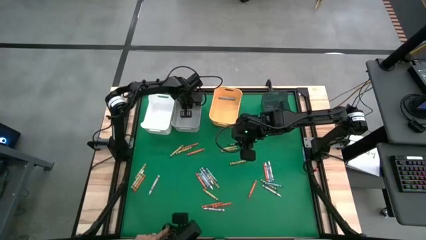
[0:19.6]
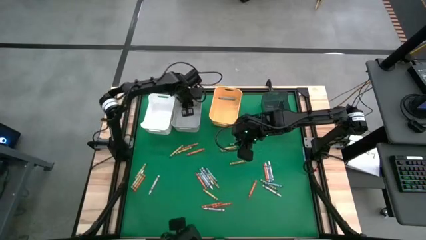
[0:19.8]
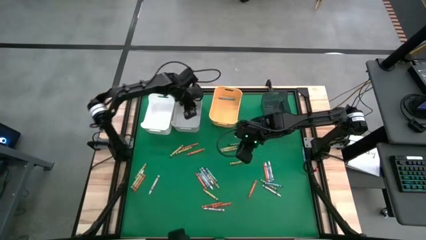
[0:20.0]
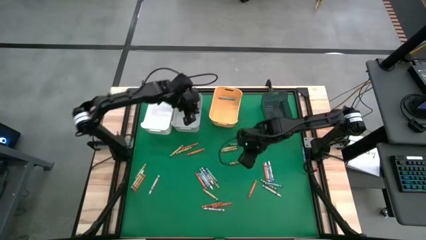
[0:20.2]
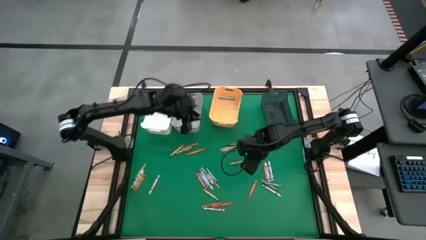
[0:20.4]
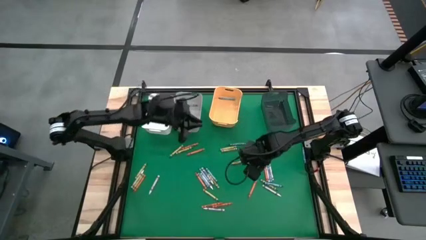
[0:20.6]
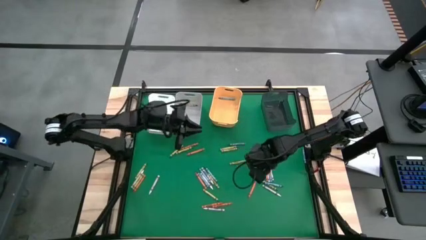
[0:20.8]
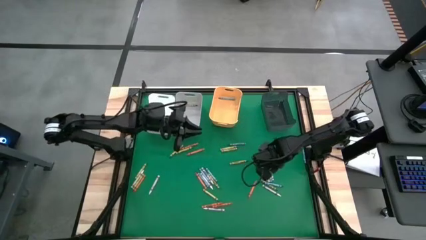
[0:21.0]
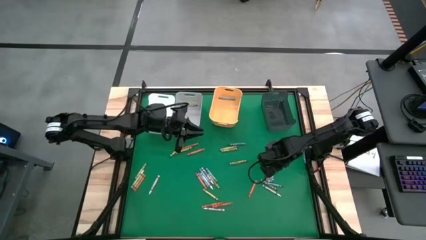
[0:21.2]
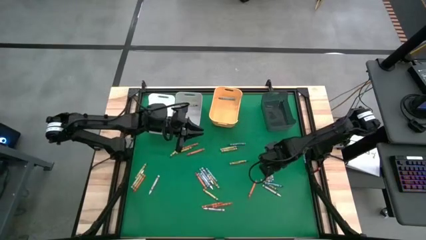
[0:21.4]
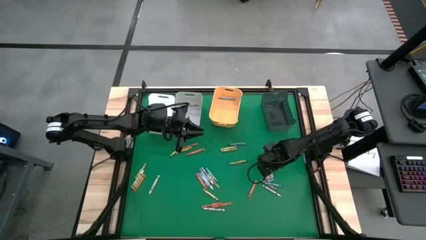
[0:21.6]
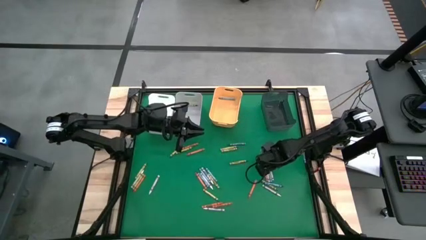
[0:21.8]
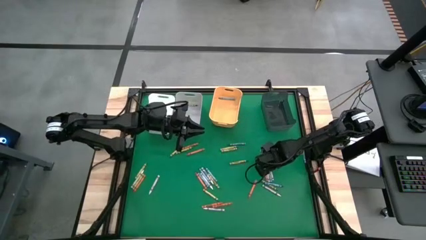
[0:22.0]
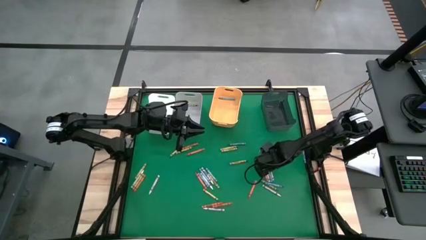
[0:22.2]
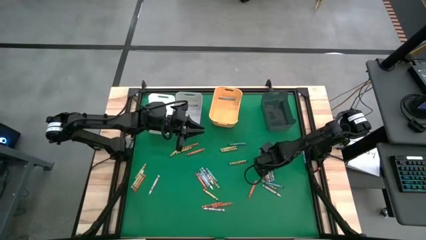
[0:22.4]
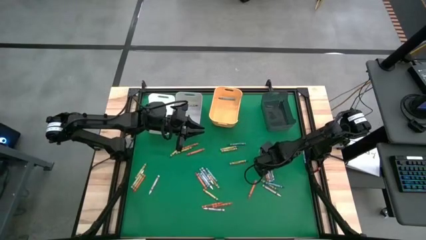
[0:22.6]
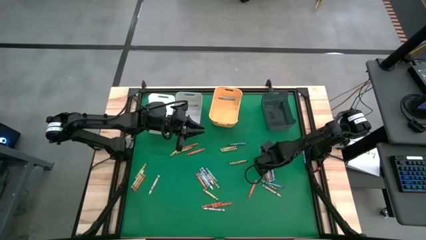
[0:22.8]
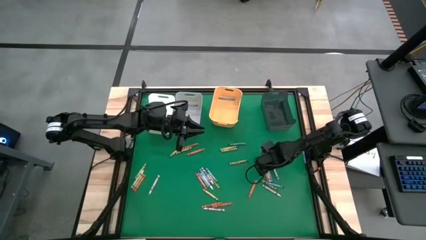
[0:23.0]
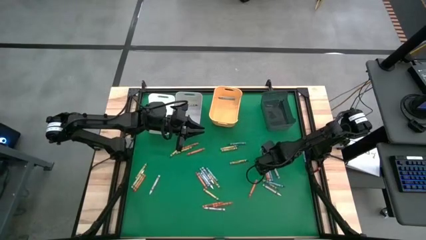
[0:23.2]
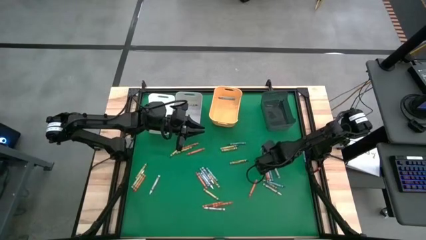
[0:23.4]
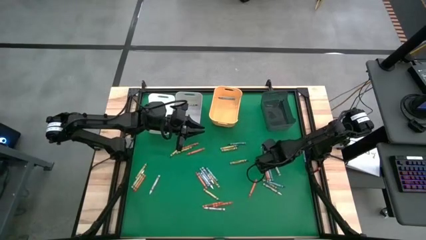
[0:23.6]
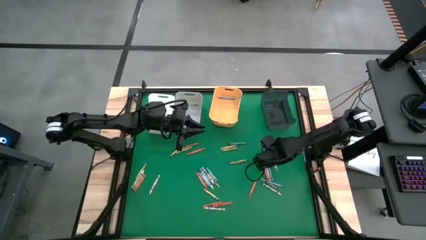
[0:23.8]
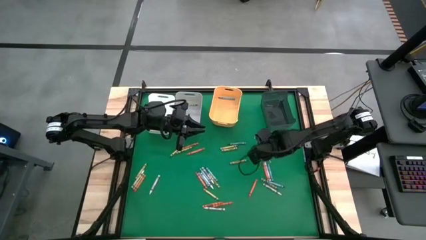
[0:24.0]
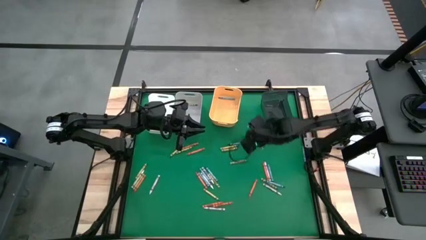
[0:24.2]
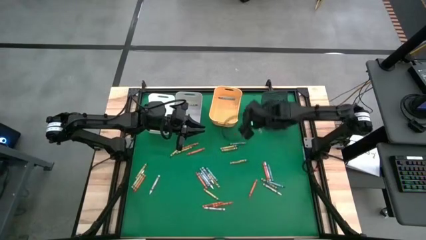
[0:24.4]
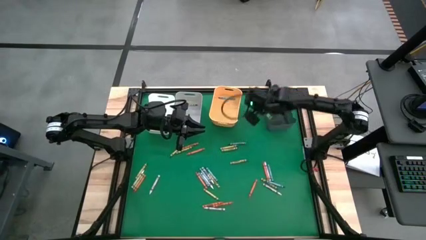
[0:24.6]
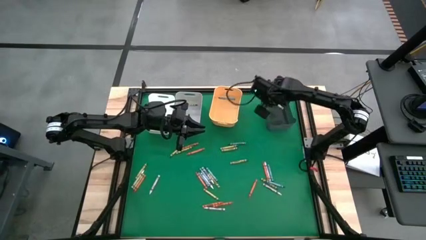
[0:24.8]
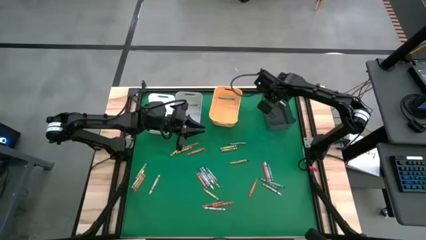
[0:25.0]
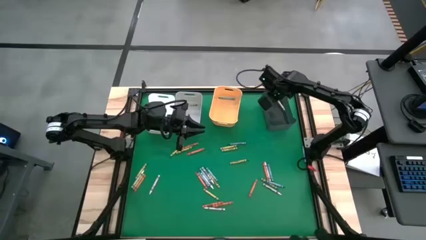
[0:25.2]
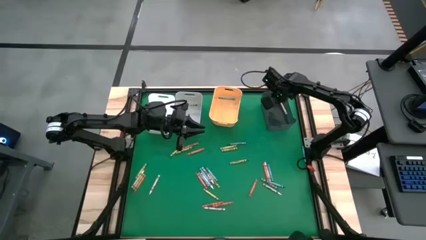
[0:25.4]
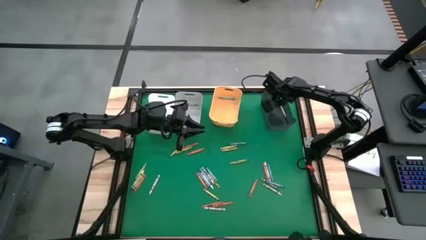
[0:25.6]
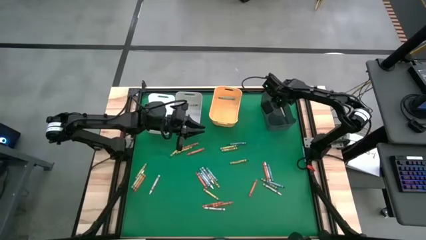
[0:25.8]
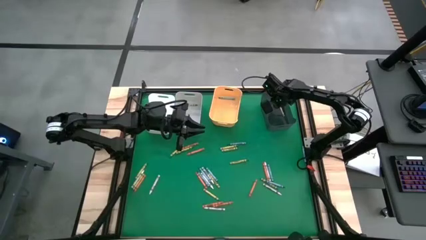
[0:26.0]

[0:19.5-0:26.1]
Task: Sort crayons
Put the white crayon into the black bin

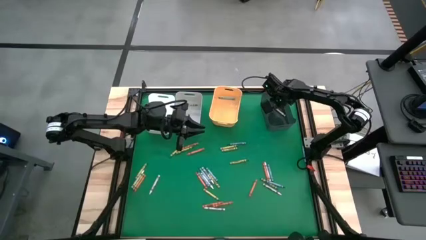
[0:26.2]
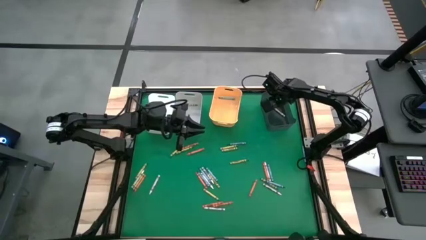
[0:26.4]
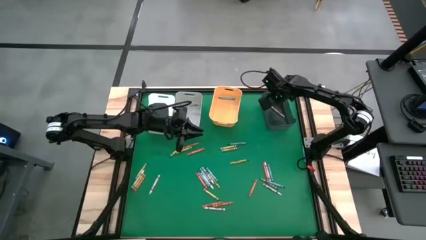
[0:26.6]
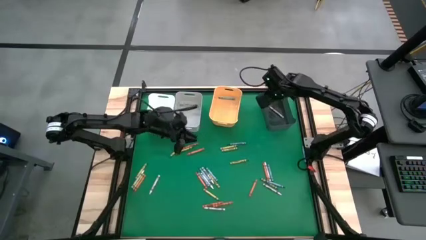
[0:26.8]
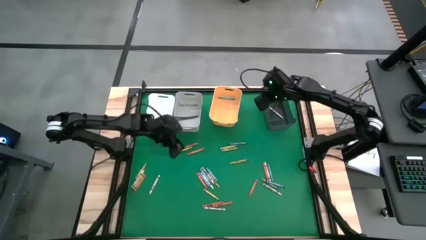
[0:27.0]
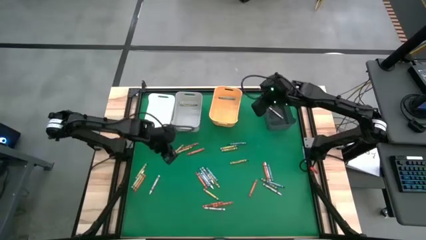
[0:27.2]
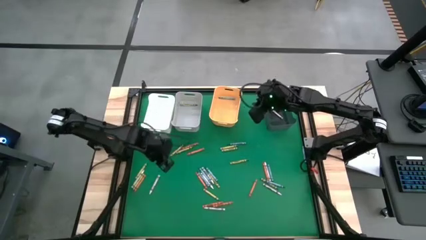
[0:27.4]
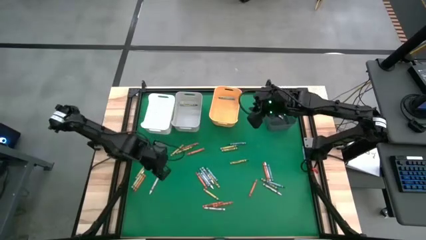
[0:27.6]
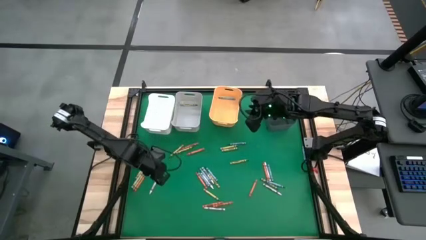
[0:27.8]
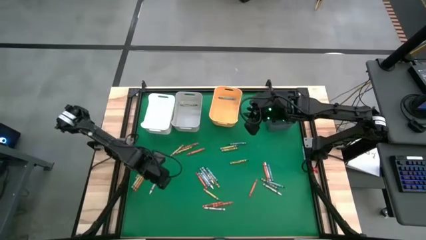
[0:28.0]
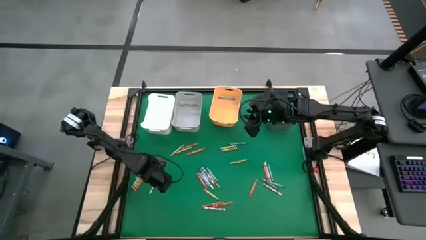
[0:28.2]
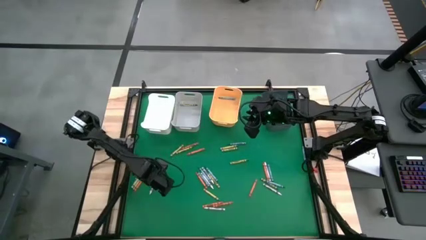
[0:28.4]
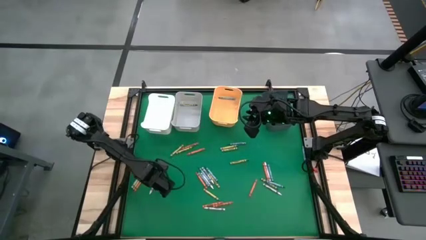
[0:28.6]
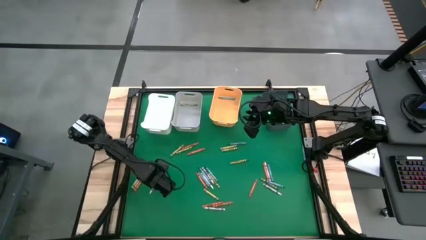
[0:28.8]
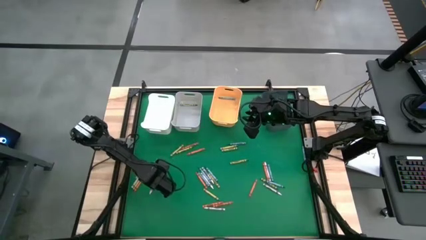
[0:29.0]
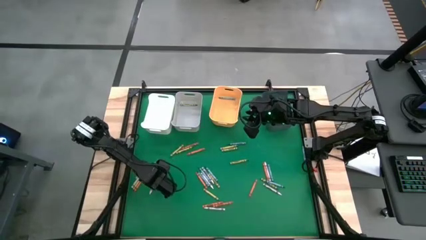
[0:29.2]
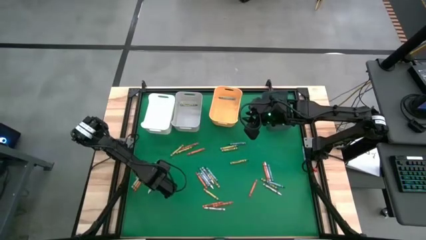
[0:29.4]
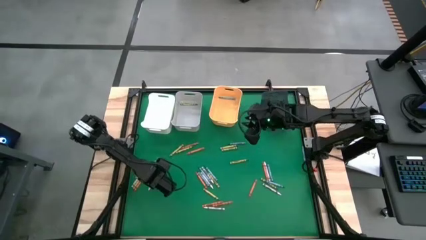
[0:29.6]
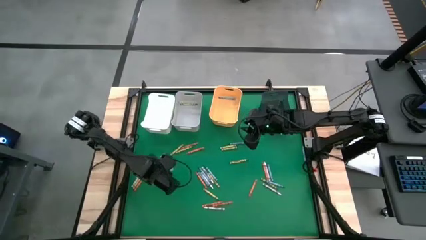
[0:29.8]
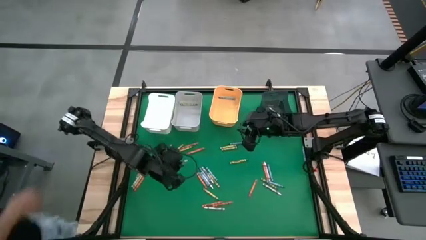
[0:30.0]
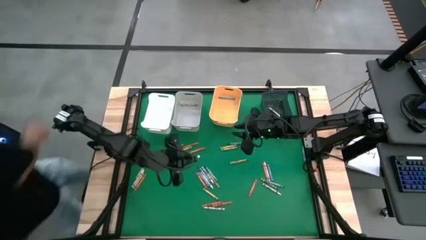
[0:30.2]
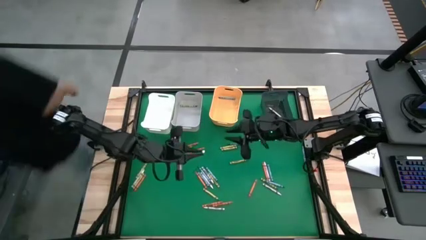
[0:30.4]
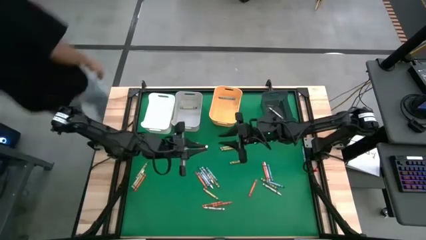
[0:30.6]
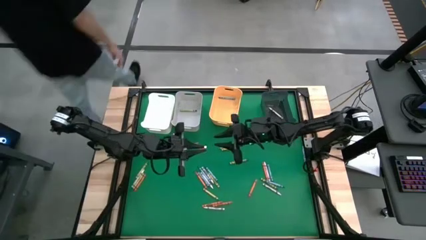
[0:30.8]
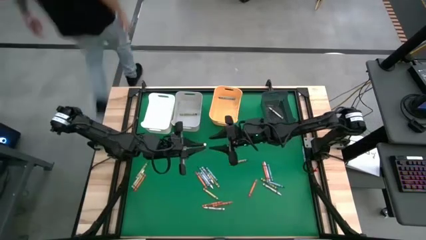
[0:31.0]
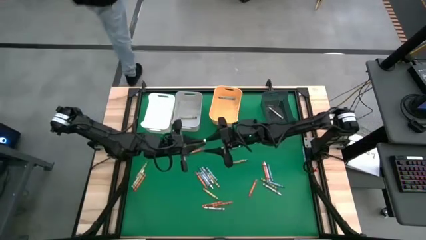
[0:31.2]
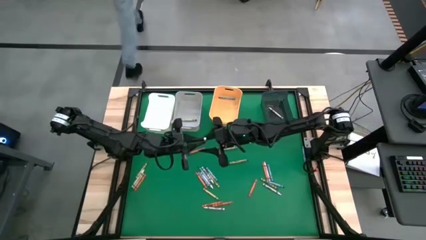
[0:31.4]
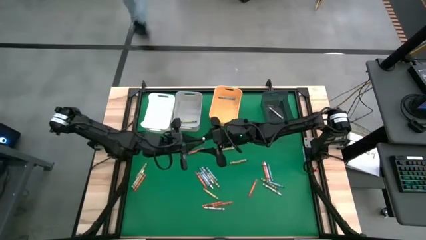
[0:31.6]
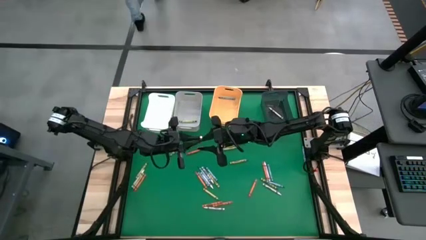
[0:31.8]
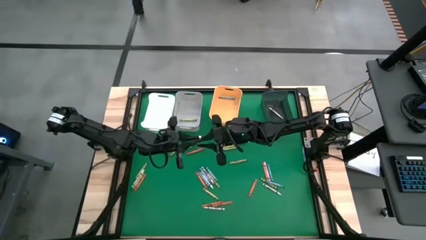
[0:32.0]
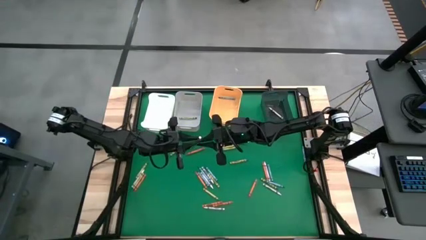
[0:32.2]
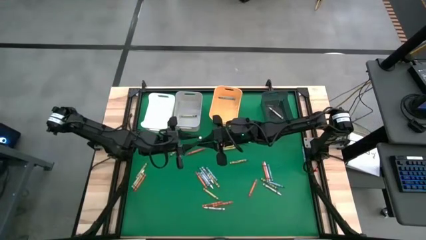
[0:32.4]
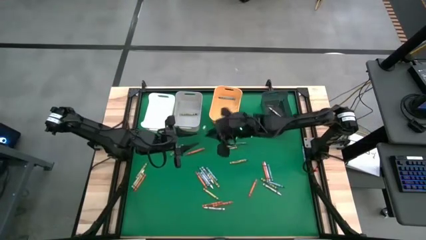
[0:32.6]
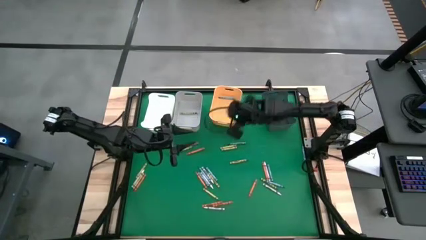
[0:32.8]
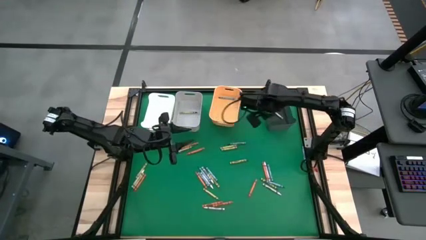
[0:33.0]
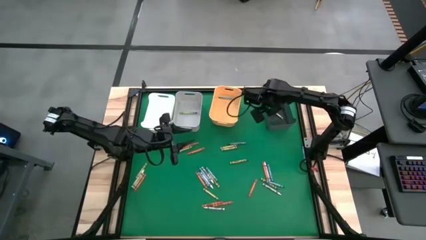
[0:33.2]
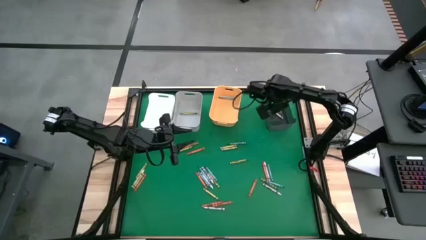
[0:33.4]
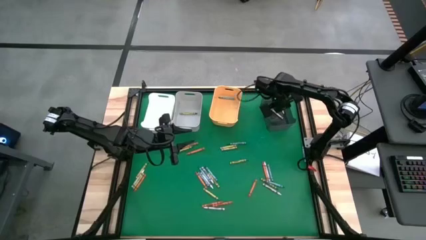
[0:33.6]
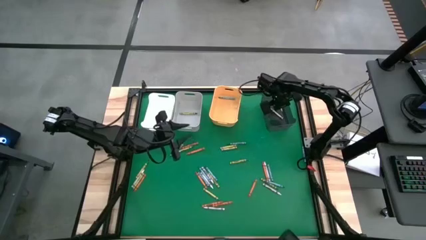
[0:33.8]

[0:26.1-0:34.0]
Put the white crayon into the black bin

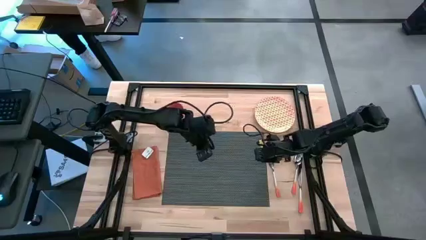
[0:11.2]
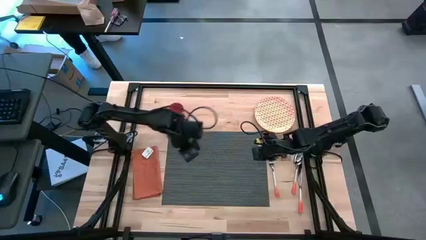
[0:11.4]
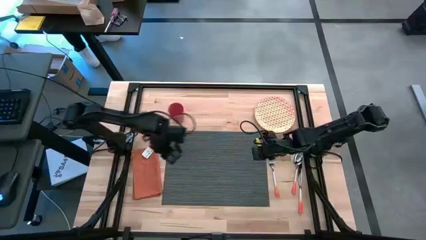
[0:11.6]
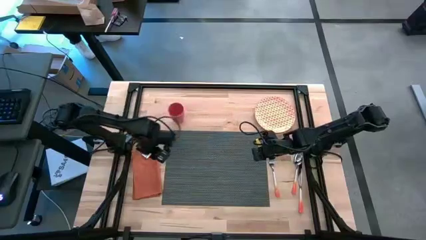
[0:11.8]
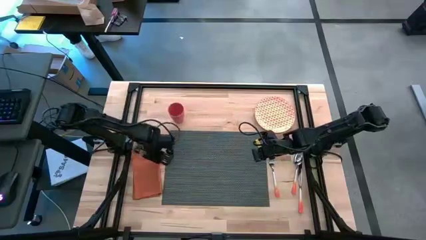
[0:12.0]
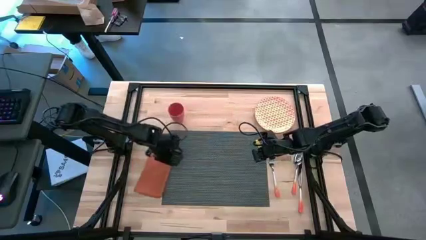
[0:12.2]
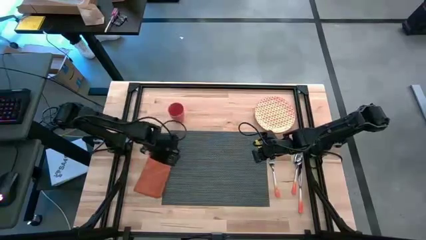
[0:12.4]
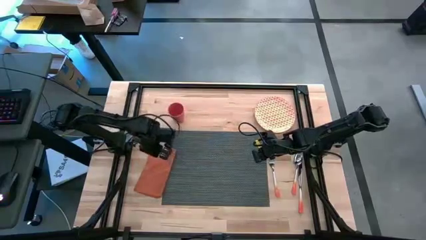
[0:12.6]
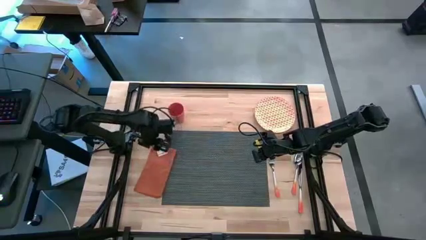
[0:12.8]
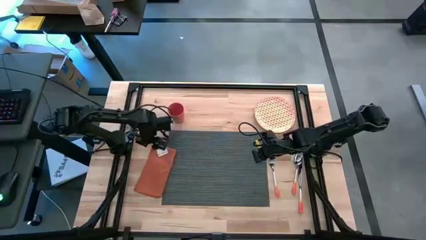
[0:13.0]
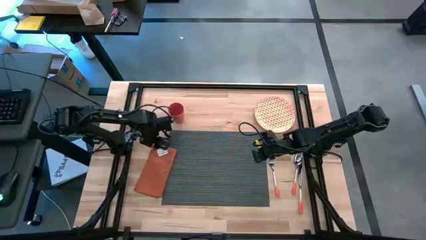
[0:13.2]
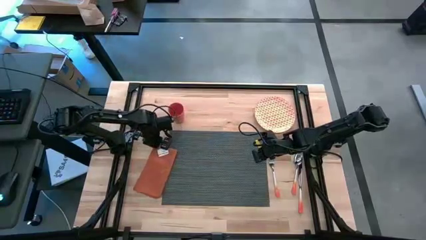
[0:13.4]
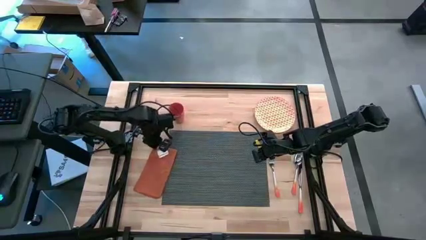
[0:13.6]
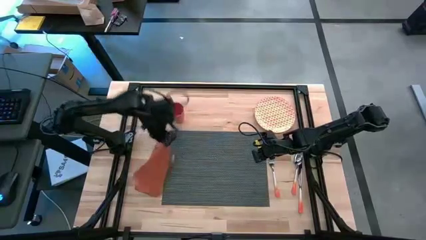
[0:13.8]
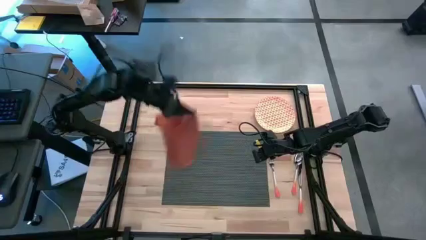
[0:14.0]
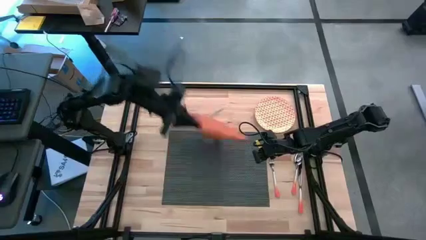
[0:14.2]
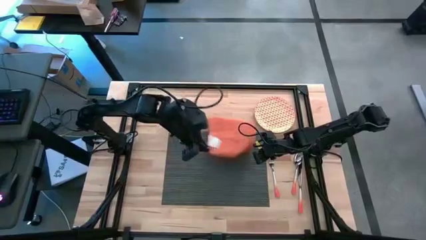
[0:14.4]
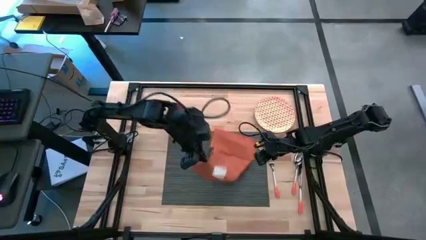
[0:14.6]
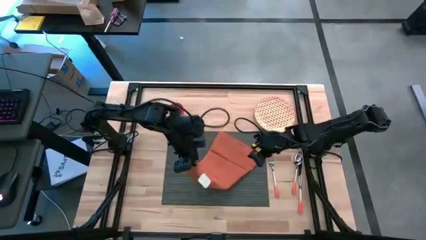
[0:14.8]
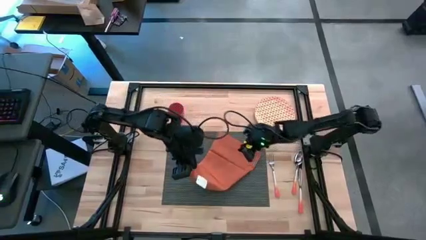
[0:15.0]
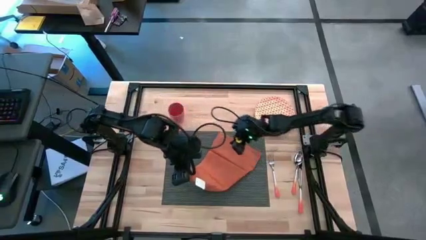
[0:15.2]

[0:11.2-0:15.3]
Task: Set table place
Fold the orange table napkin
